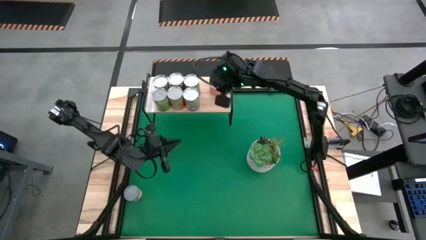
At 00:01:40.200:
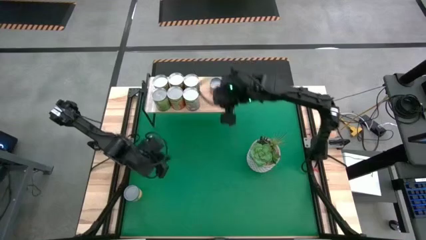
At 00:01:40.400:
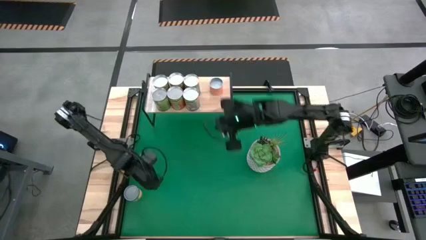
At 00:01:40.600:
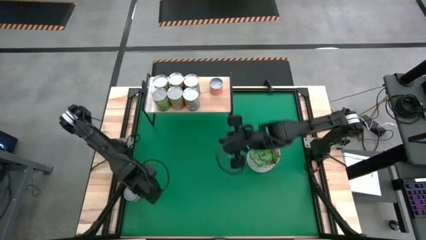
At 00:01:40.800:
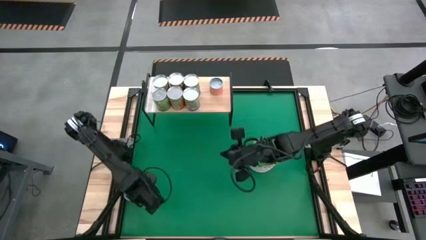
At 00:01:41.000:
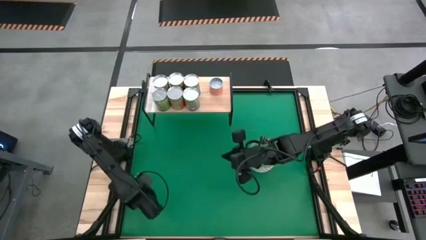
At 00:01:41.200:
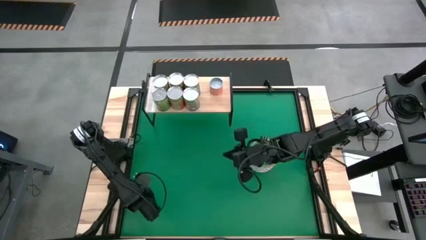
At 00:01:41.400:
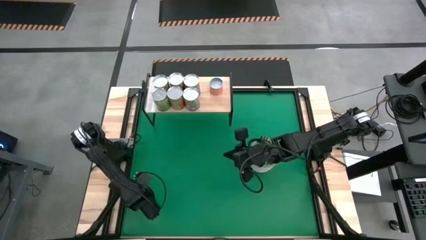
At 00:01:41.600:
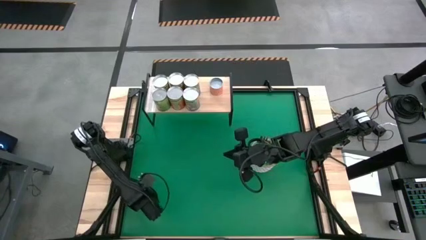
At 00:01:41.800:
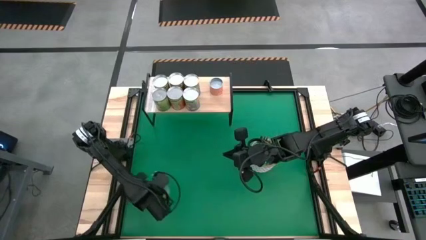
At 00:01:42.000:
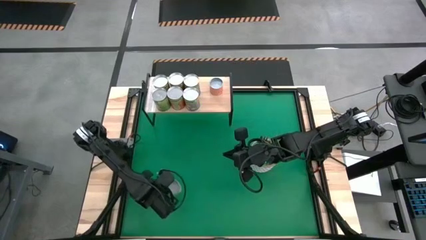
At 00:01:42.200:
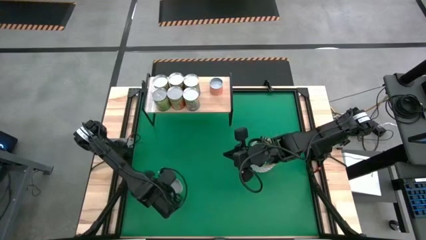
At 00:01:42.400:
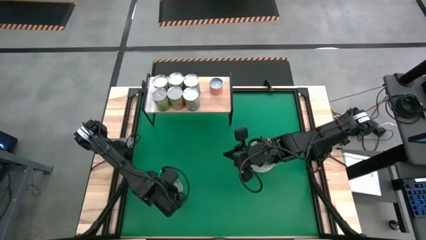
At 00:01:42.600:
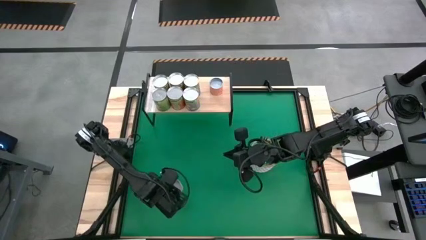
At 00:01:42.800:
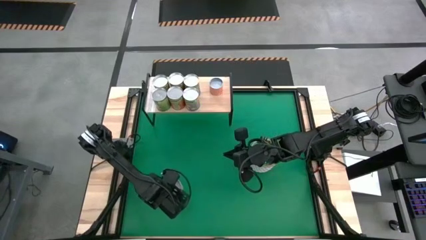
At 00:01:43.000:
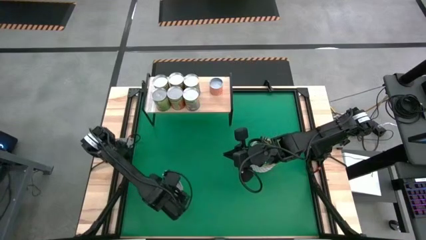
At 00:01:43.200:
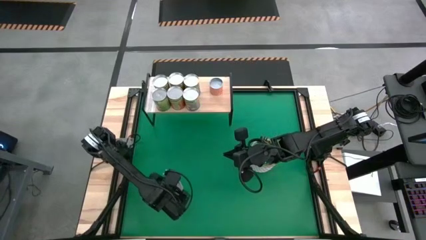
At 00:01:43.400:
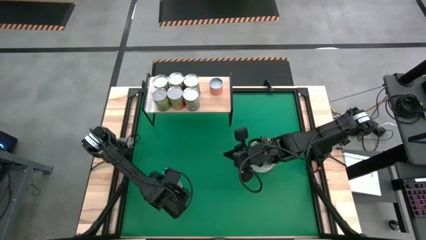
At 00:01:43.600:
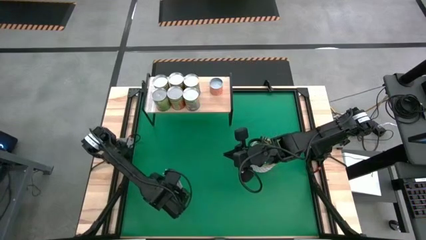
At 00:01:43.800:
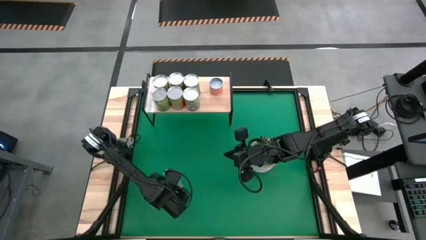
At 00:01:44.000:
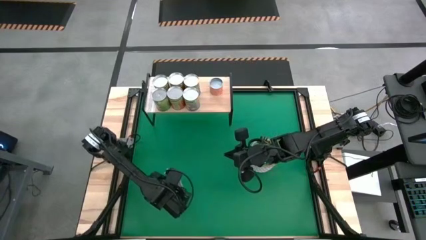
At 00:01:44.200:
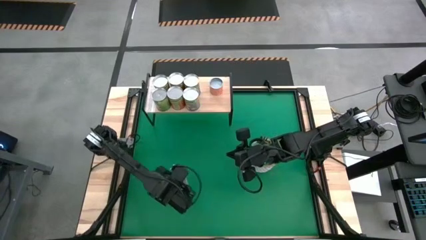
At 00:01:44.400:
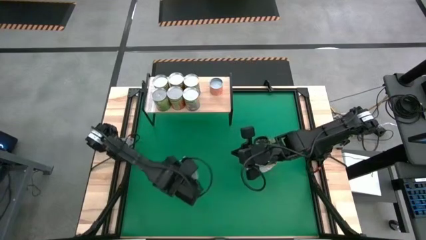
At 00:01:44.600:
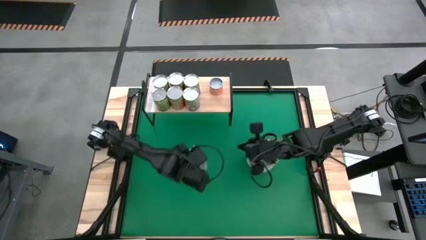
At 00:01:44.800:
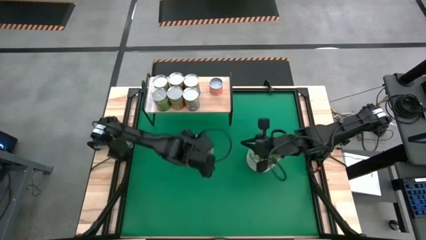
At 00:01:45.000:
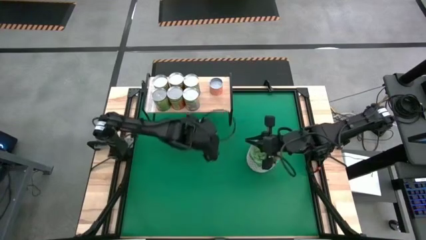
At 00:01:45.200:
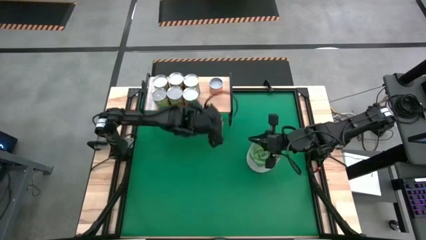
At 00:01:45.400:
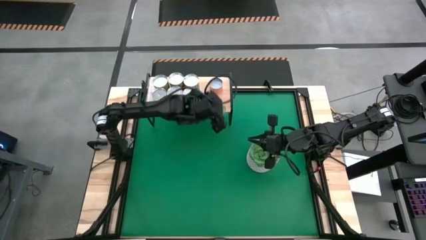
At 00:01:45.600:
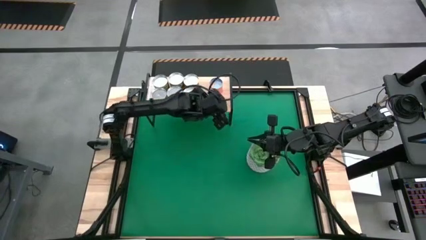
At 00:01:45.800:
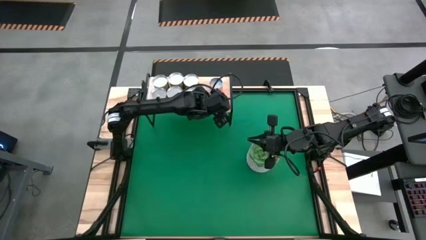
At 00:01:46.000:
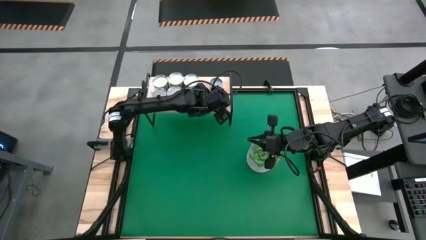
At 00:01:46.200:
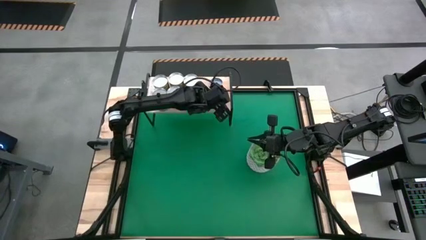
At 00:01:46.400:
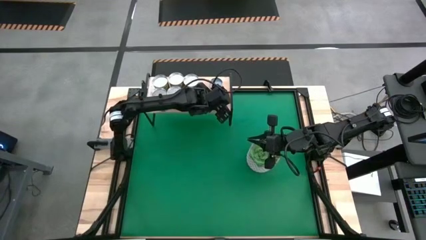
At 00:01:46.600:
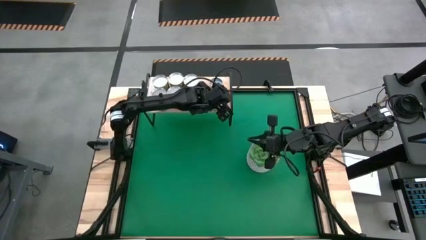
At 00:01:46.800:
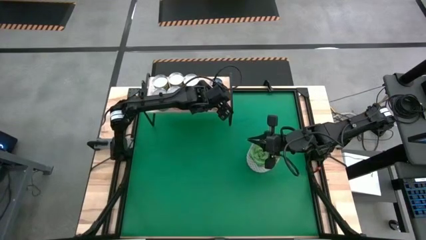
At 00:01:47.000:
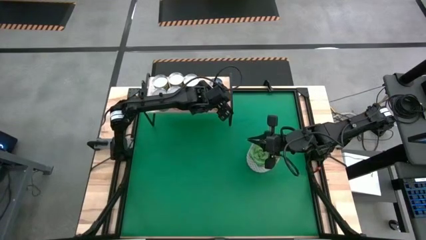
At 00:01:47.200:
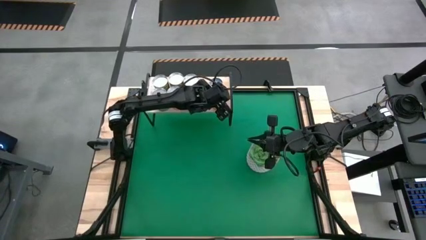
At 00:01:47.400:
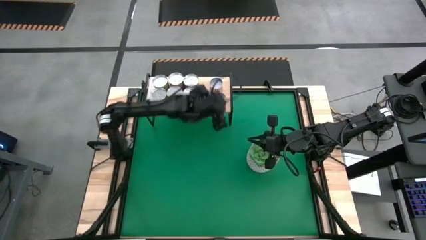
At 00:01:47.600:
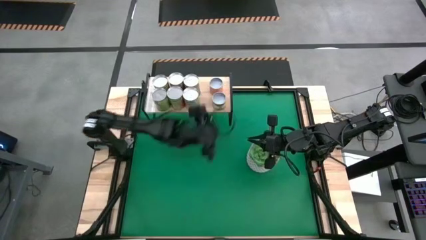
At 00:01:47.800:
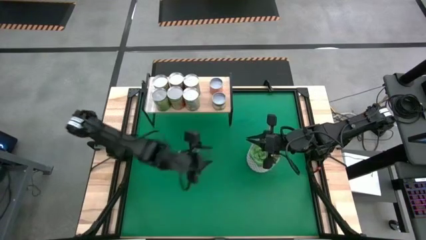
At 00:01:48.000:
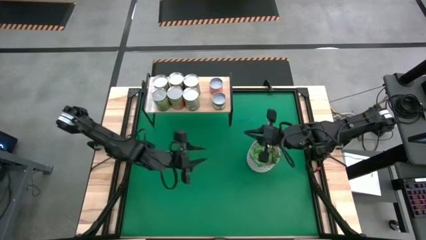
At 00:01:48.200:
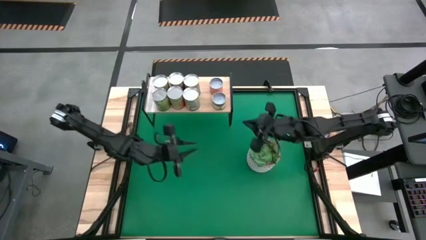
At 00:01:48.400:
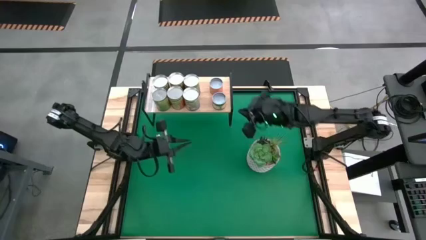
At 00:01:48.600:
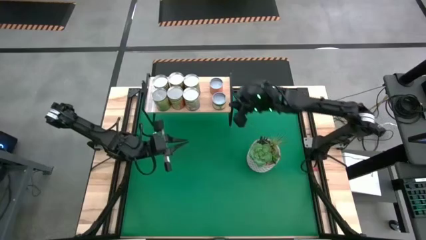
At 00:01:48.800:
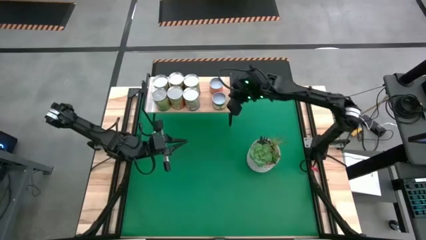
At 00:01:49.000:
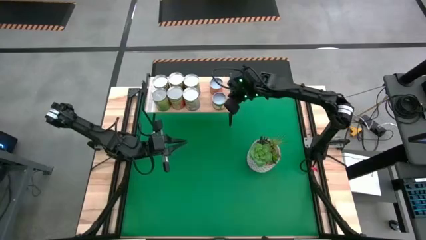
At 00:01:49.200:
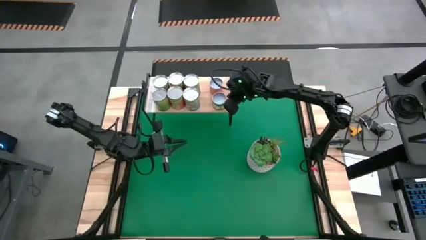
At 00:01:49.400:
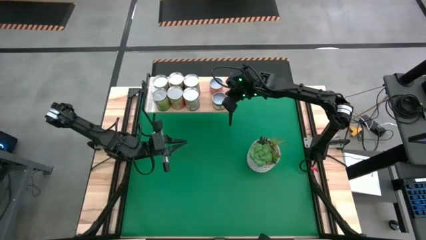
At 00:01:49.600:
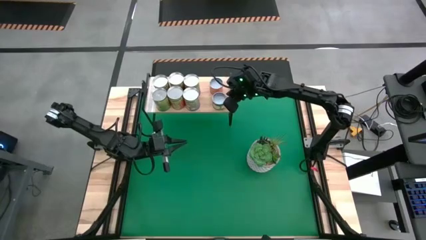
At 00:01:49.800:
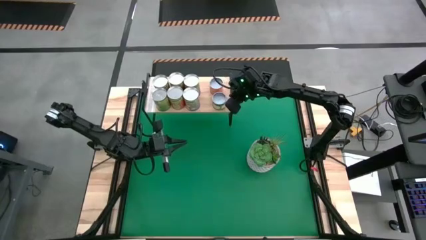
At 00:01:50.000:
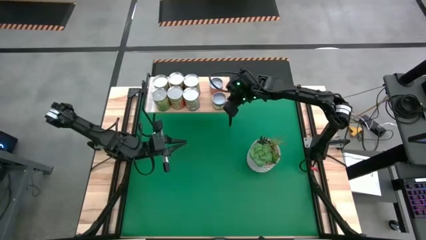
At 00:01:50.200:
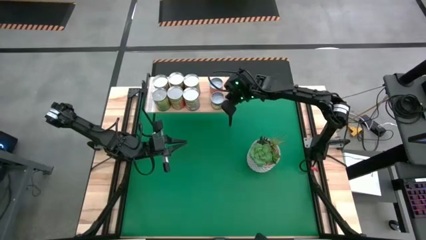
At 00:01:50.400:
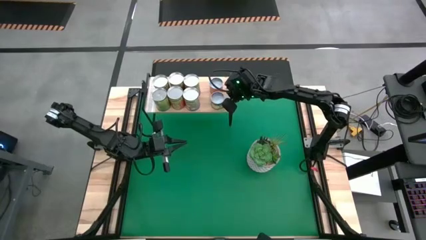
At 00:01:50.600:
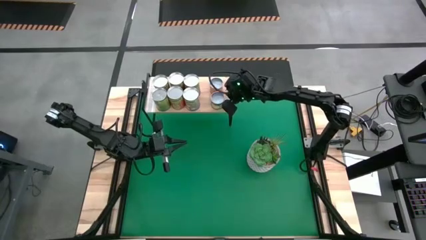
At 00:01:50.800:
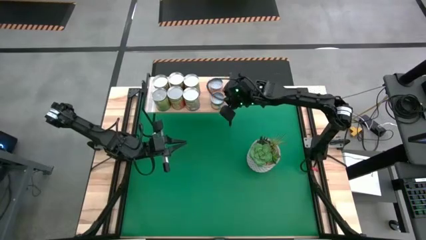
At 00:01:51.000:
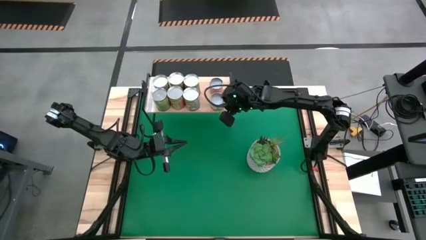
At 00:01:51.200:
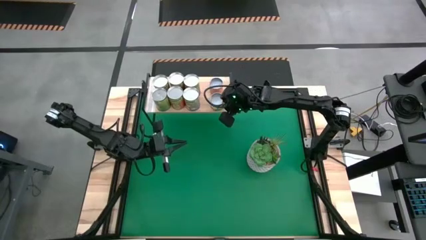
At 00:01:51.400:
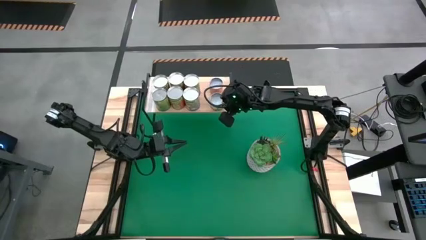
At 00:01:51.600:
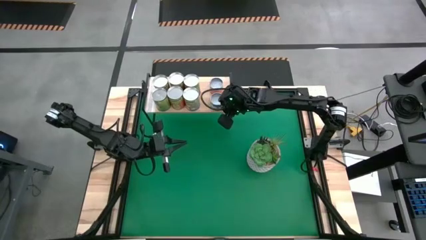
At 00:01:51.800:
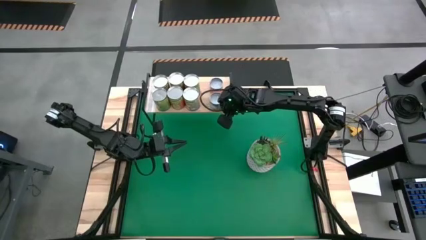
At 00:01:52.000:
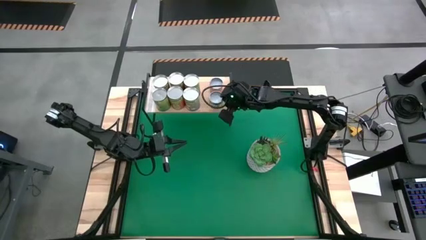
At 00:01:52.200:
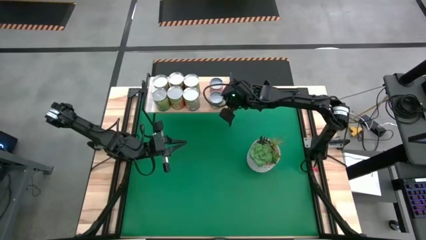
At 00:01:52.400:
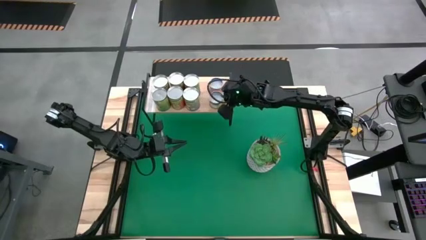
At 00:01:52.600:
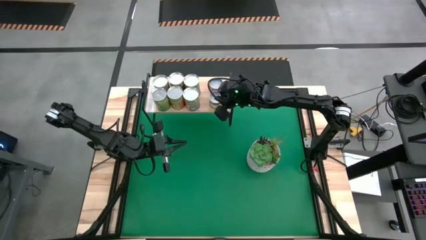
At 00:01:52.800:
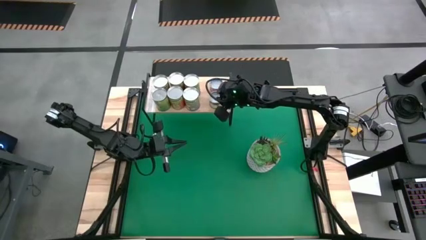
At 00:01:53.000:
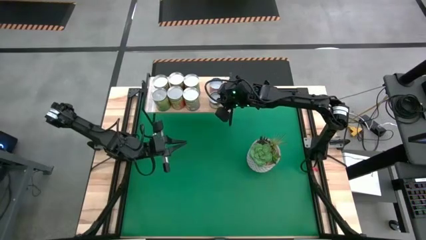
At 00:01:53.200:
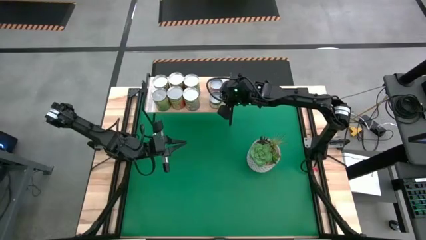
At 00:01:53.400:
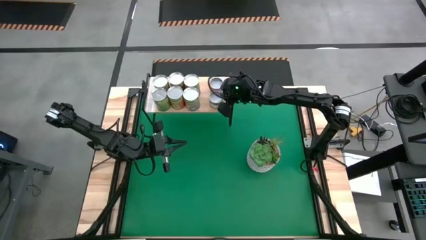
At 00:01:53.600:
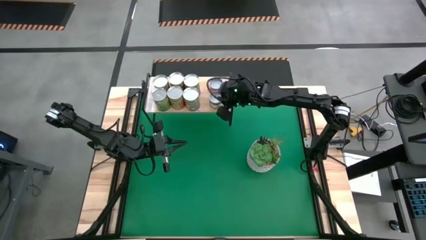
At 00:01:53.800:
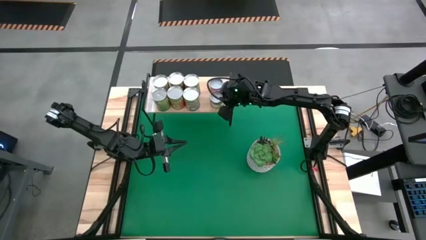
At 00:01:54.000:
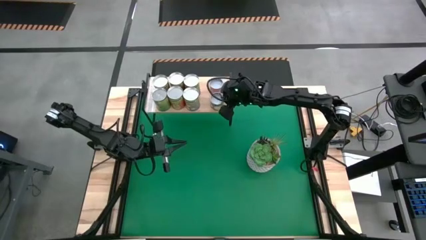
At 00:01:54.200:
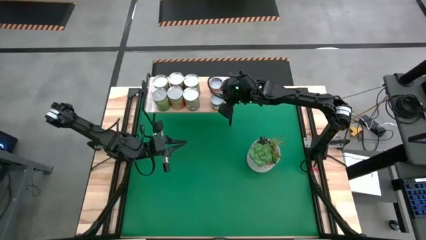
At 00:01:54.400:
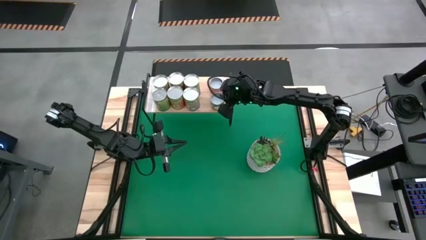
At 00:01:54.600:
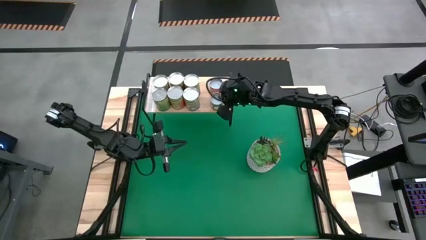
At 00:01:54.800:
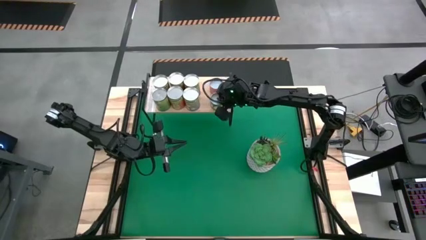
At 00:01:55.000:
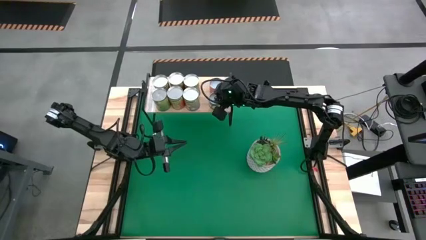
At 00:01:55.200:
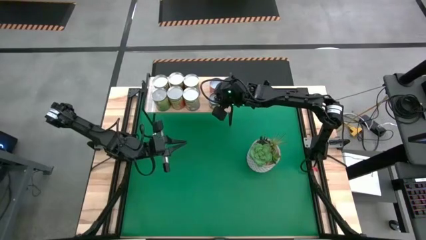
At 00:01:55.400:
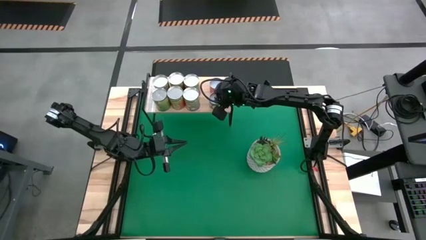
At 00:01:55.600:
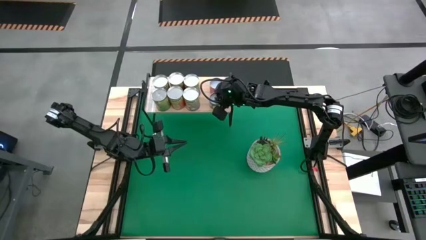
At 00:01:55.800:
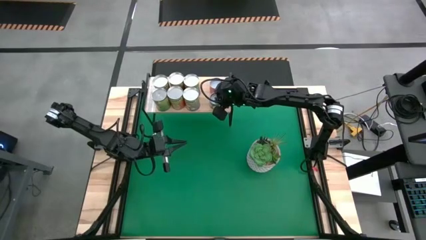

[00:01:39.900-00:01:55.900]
Task: Pick and place cans onto a shelf
Put the small canned sliced peaches on the shelf
